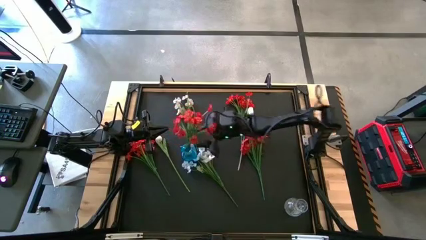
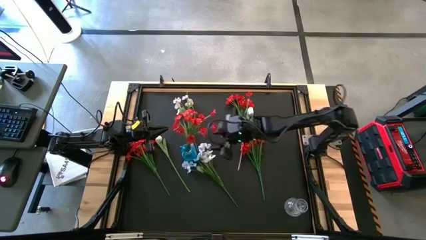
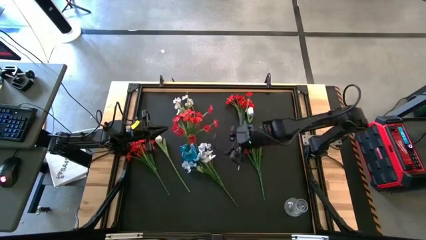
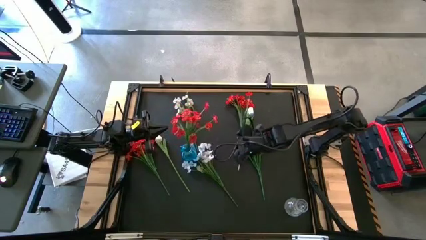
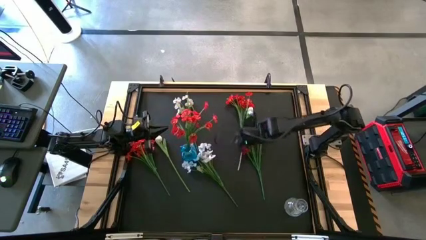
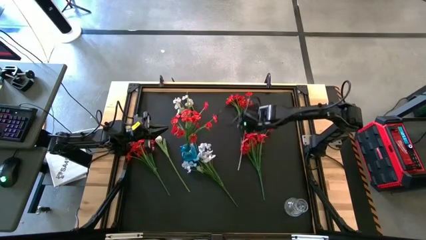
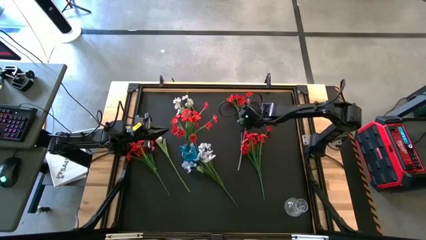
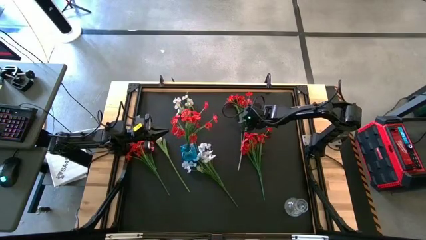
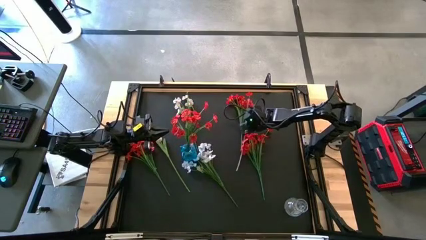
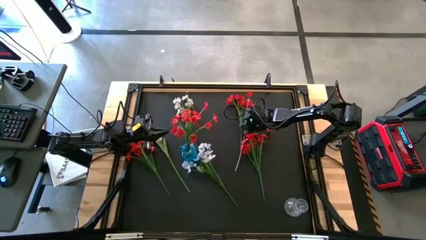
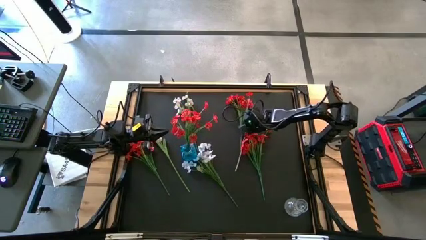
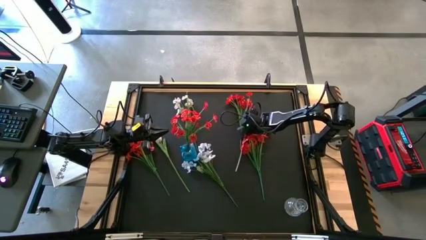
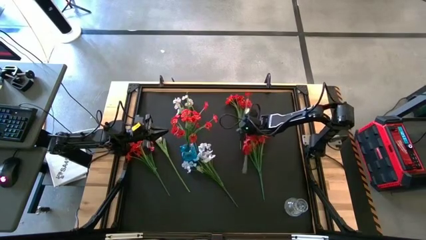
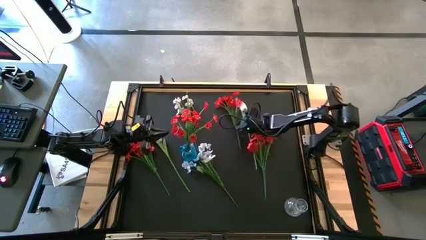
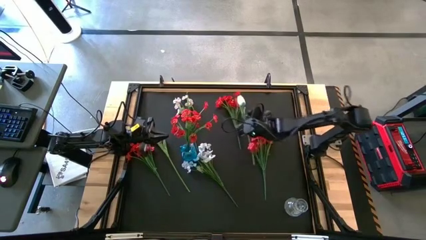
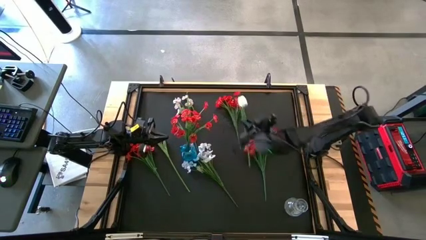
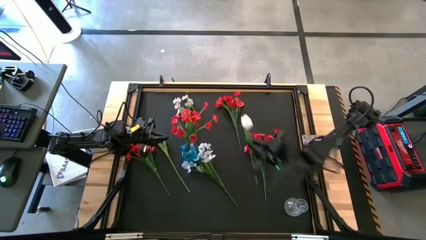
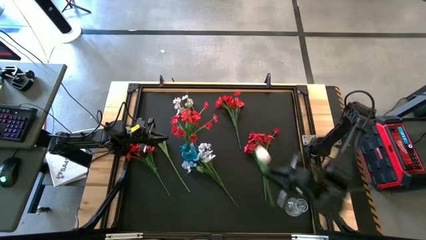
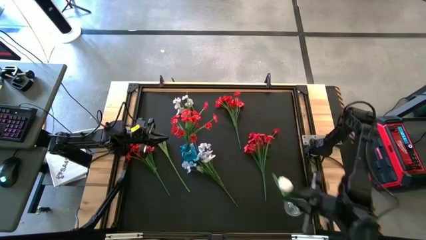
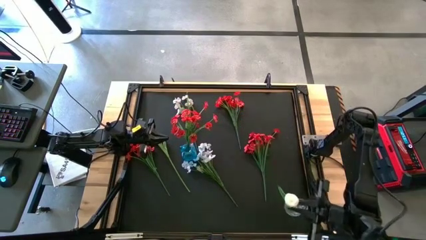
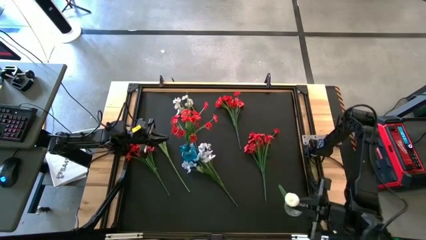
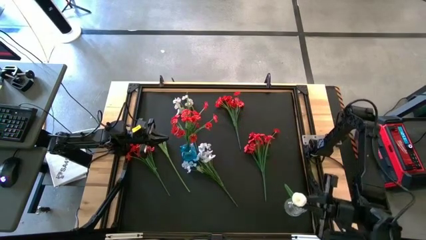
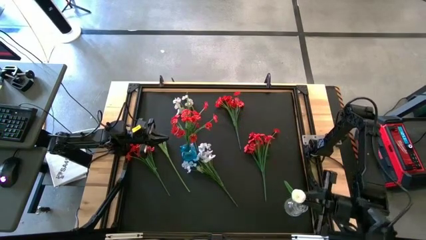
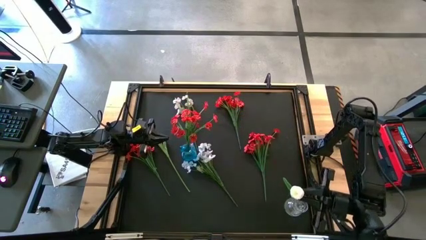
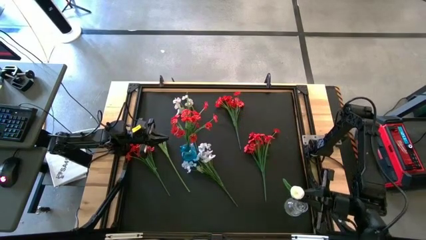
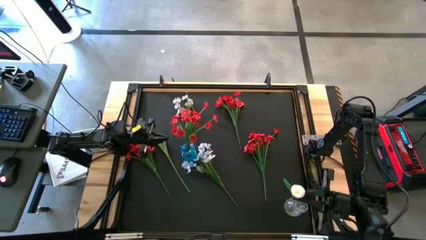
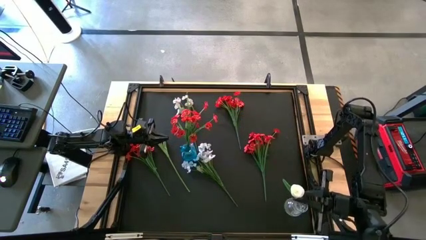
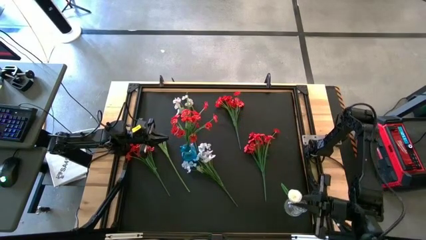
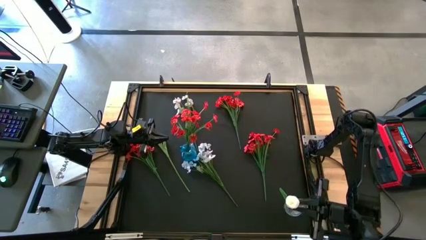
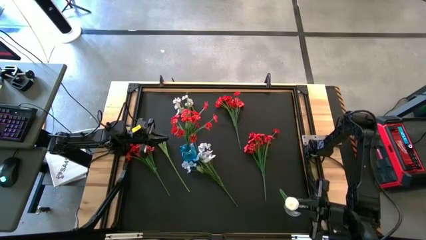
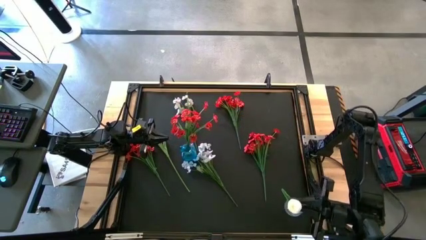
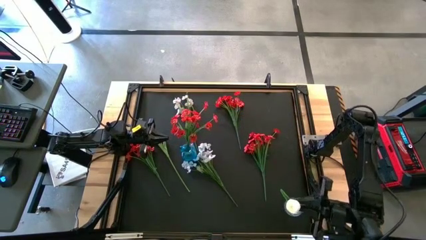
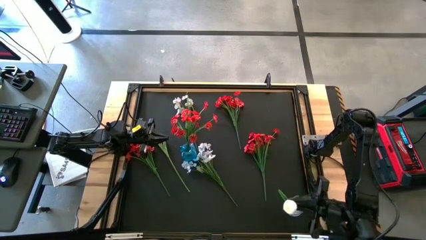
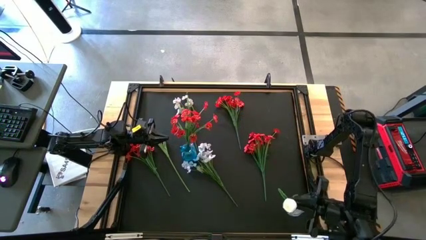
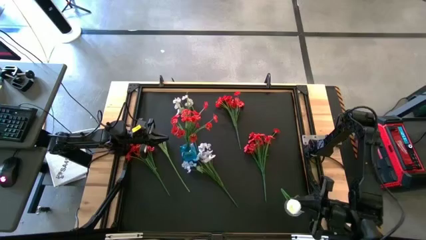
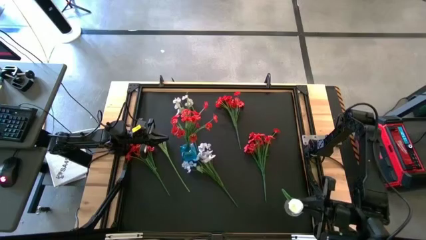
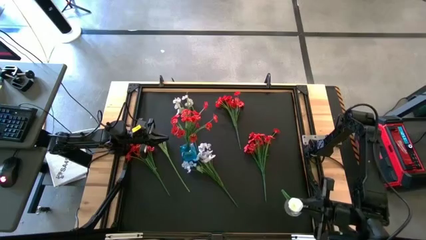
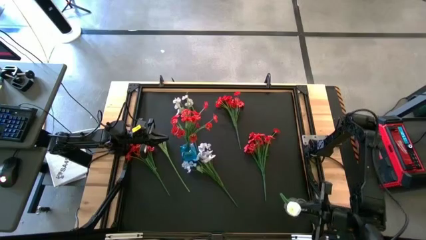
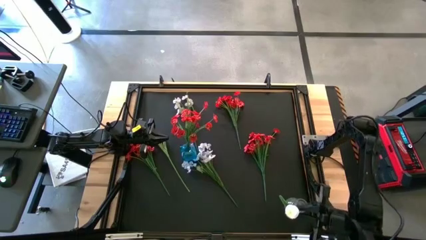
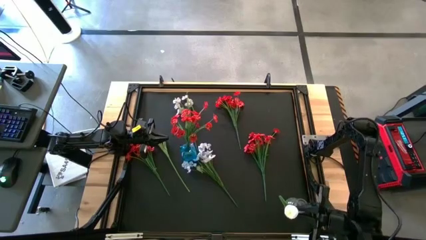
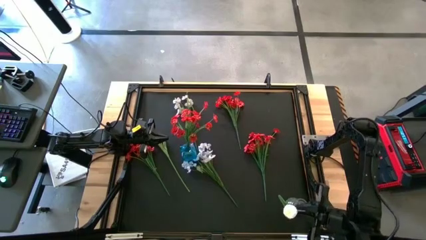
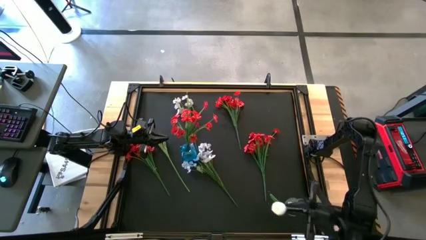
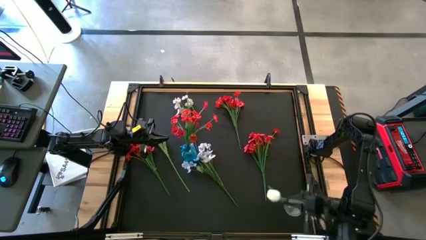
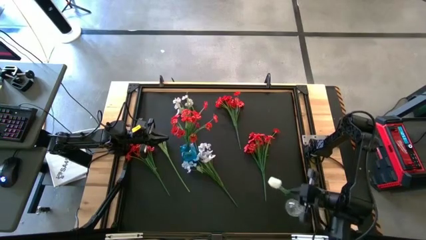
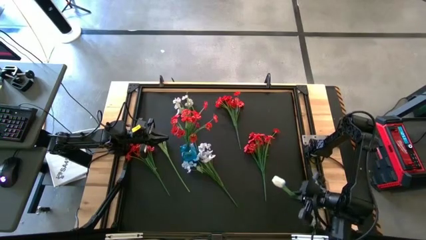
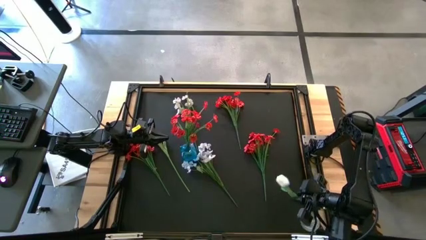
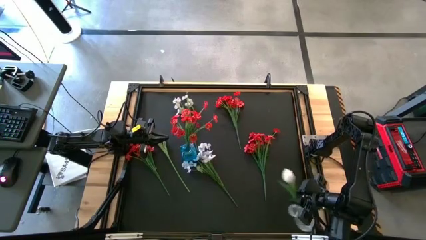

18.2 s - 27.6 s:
Task: Sort flowers into vase by color
Put the white flower into the transparent vase

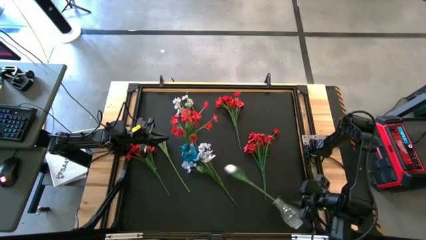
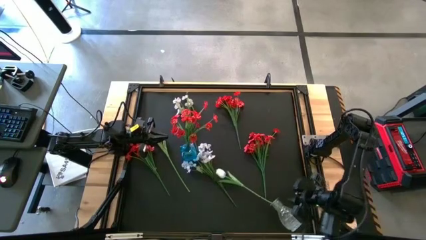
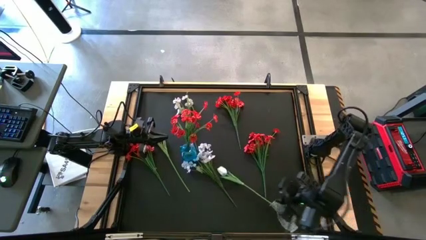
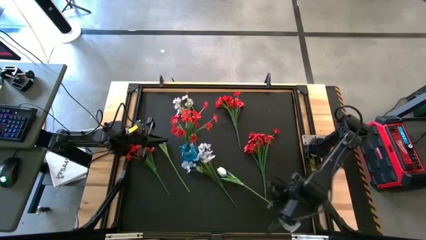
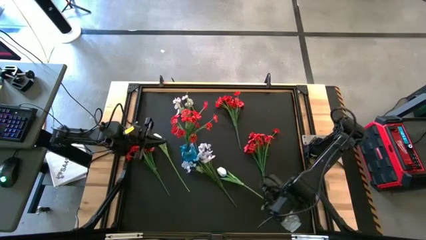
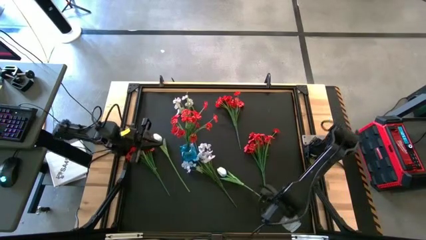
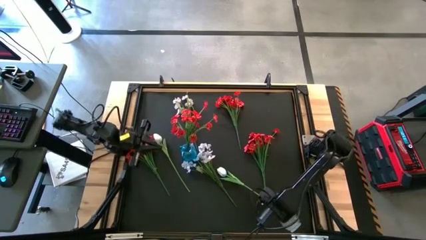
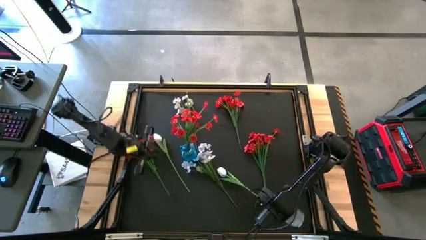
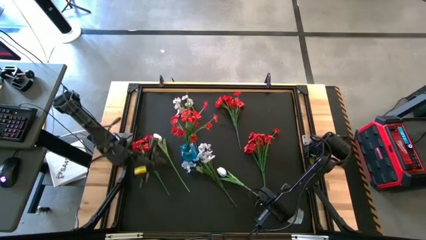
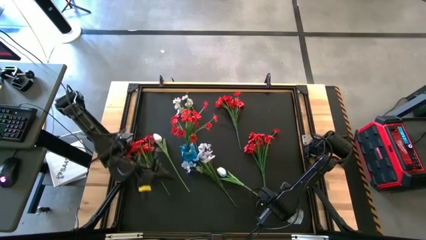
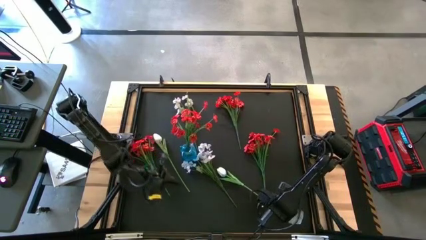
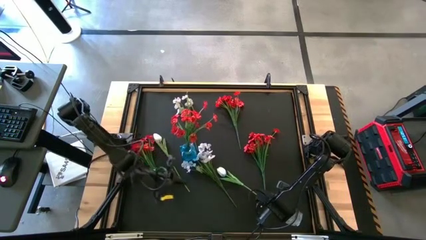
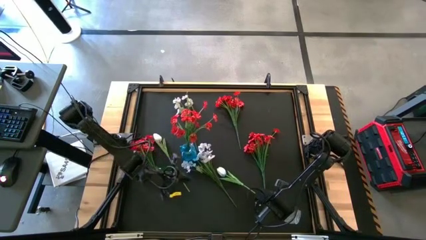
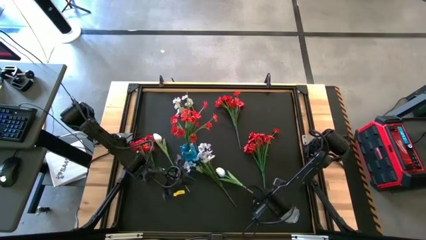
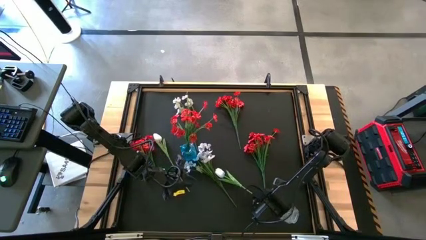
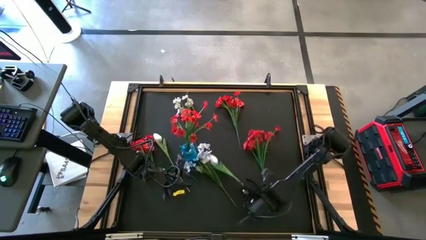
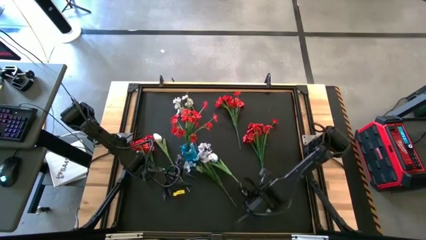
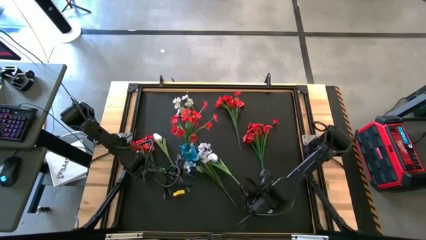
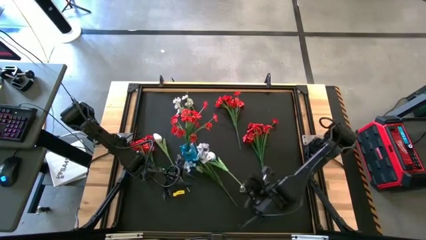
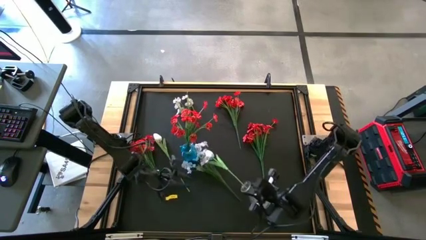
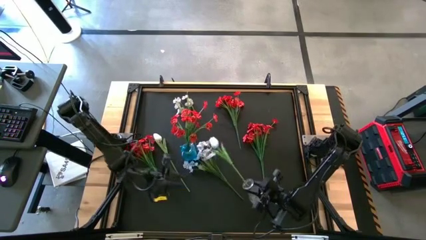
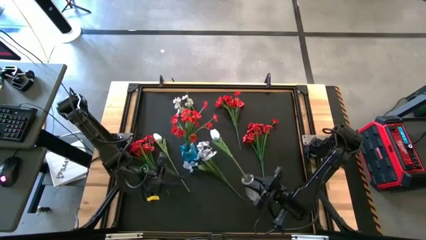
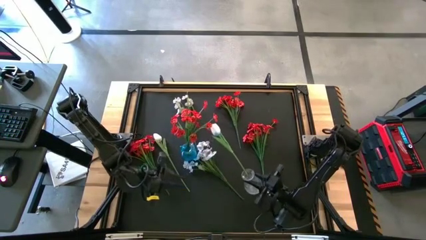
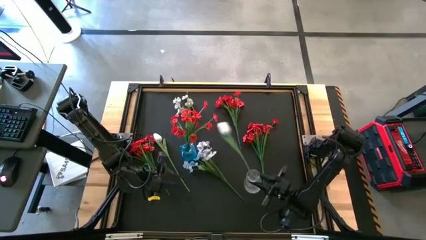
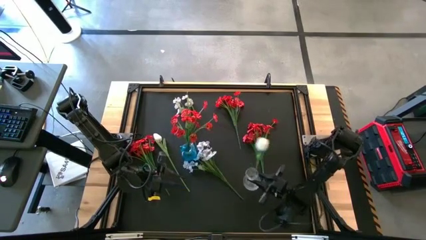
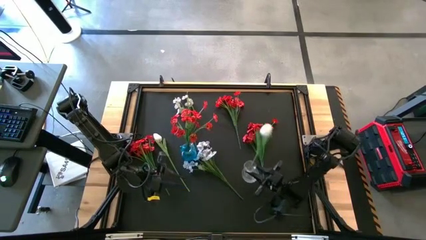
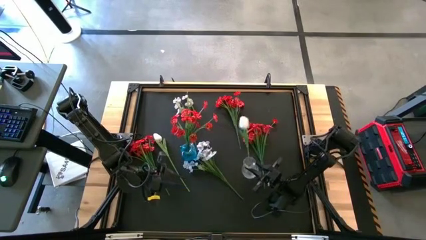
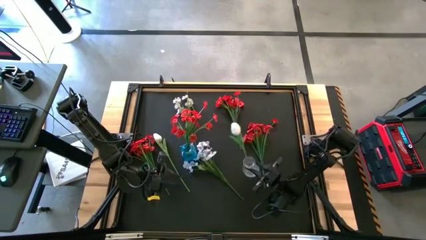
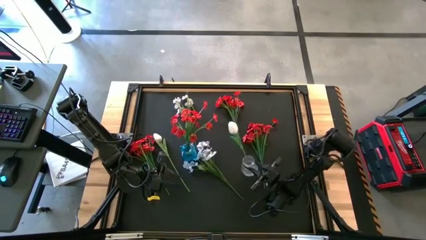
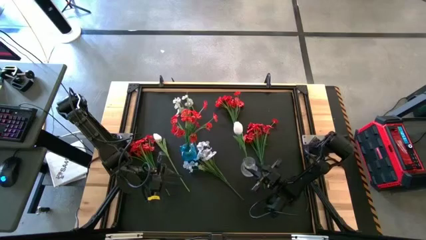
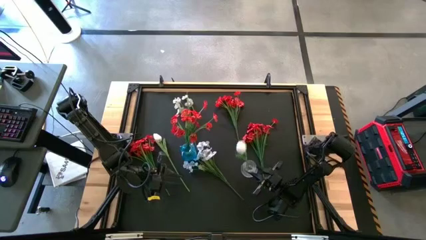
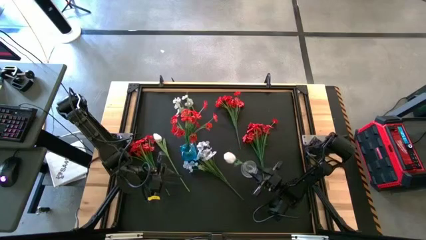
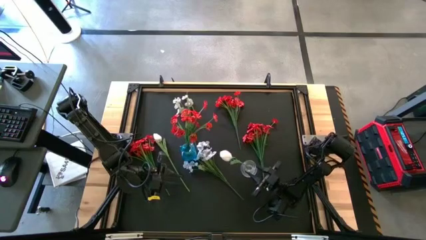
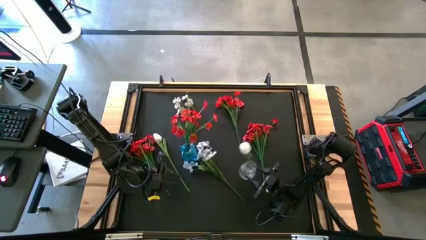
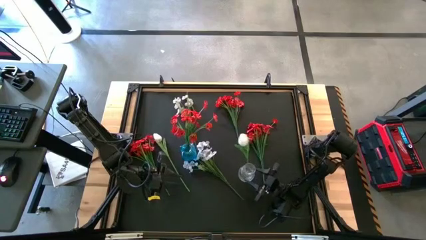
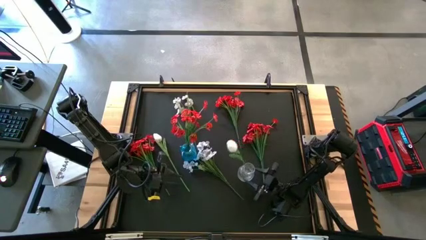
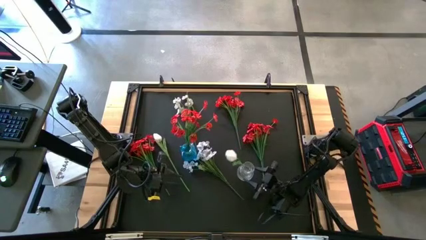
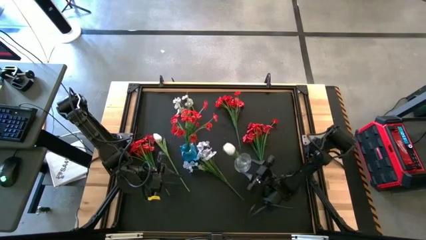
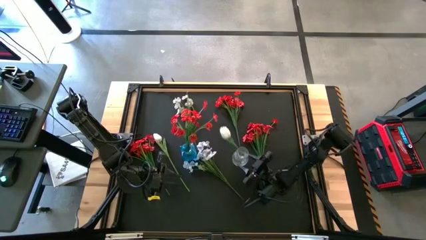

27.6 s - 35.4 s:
Adjust the transparent vase
